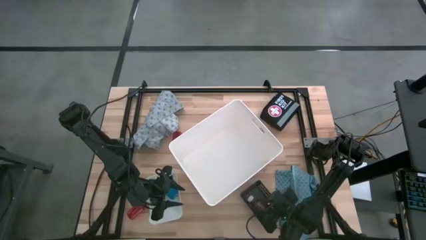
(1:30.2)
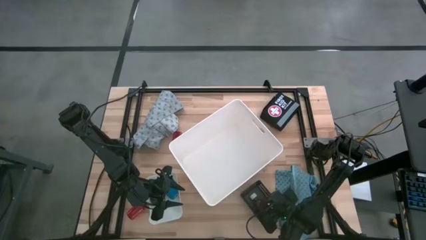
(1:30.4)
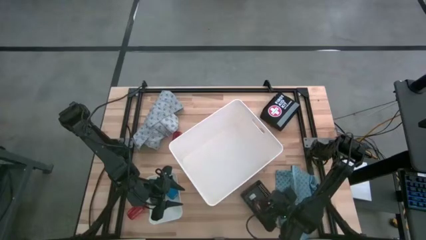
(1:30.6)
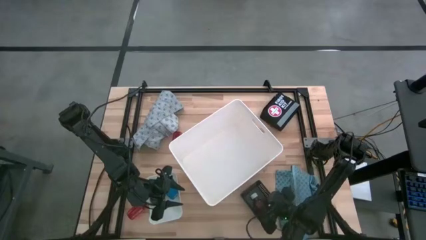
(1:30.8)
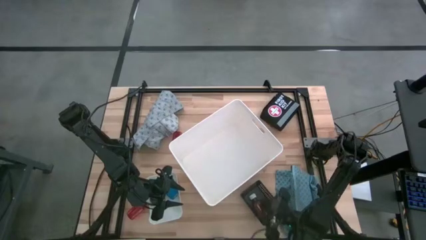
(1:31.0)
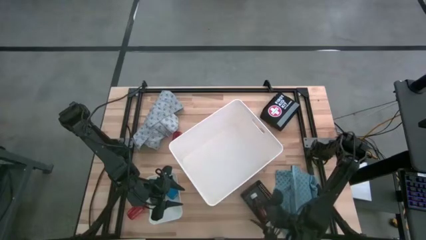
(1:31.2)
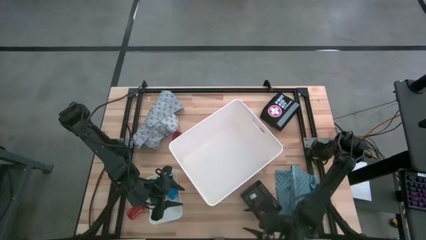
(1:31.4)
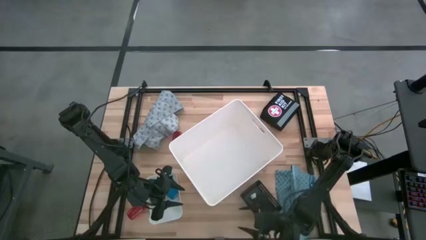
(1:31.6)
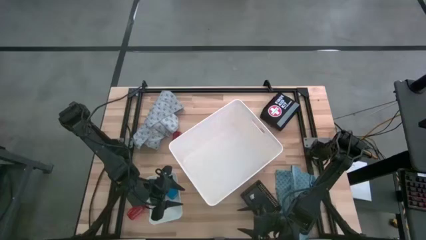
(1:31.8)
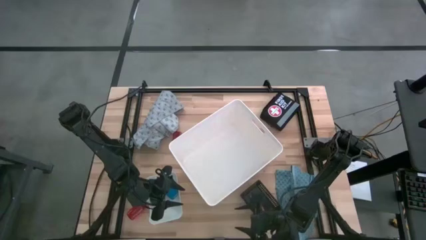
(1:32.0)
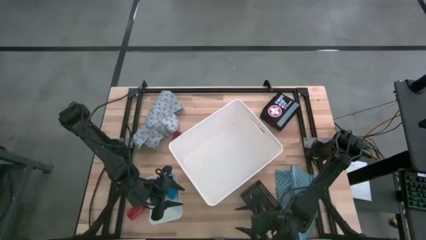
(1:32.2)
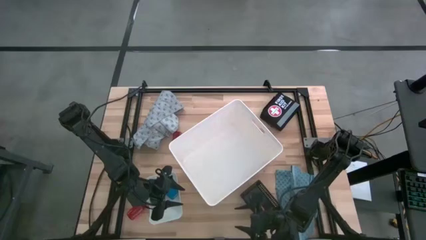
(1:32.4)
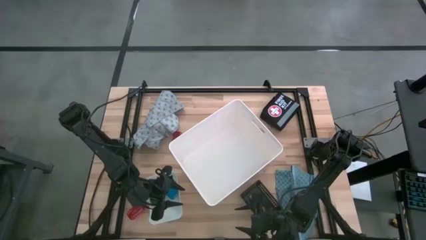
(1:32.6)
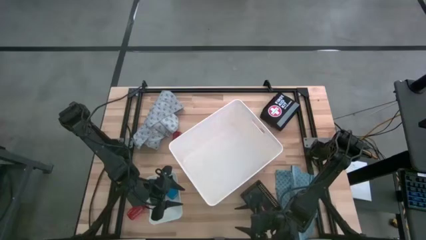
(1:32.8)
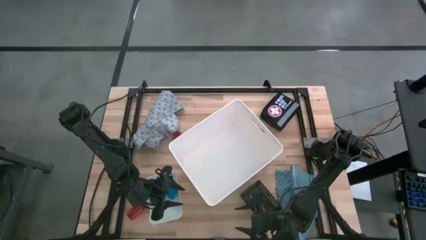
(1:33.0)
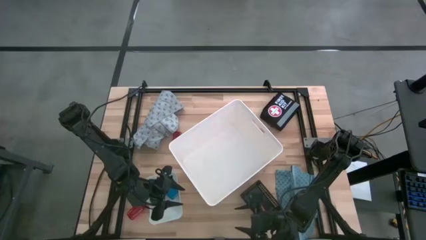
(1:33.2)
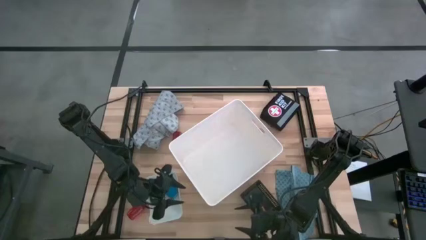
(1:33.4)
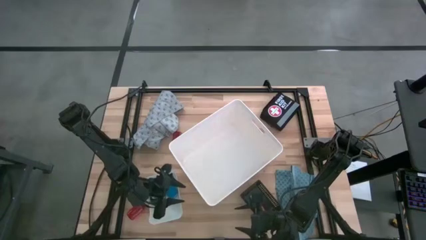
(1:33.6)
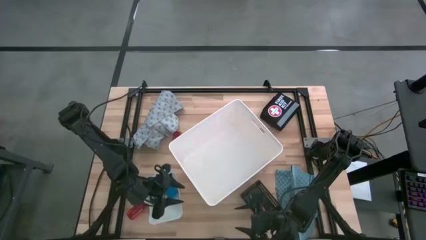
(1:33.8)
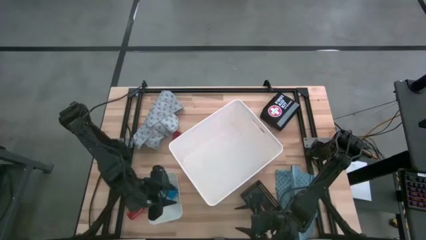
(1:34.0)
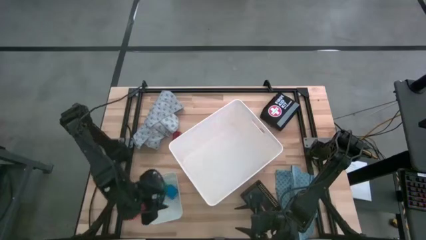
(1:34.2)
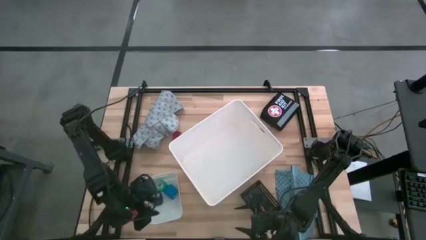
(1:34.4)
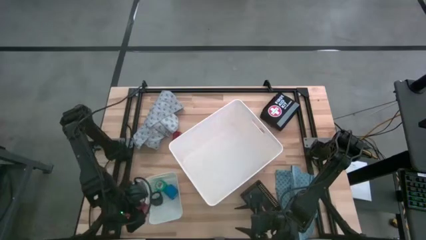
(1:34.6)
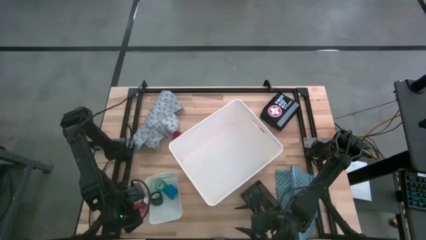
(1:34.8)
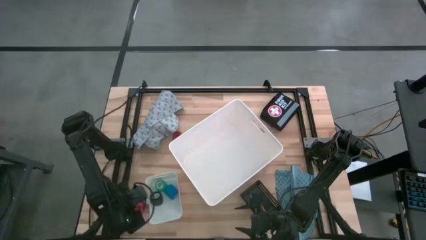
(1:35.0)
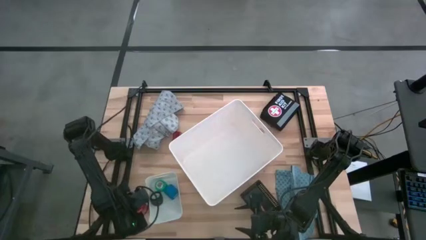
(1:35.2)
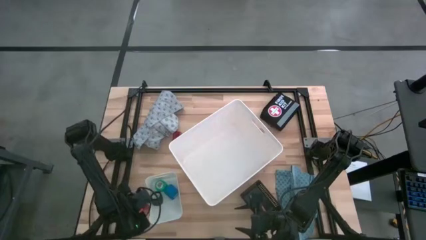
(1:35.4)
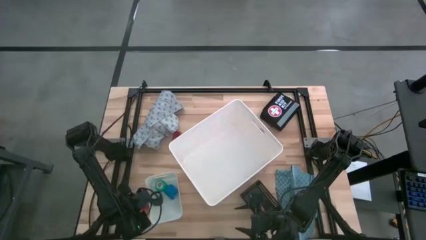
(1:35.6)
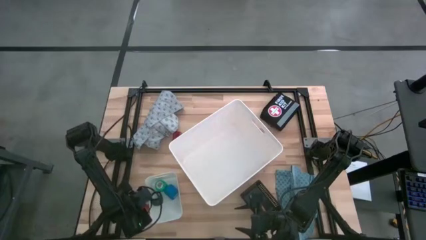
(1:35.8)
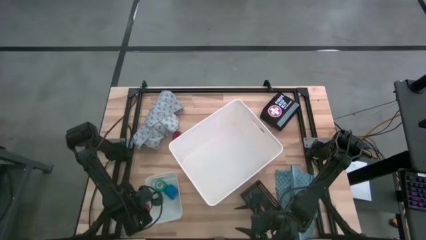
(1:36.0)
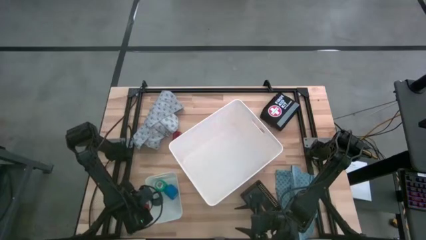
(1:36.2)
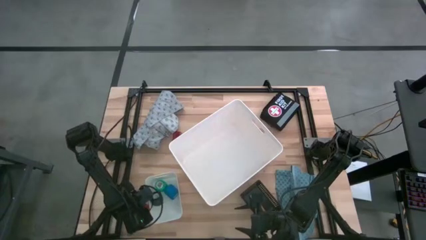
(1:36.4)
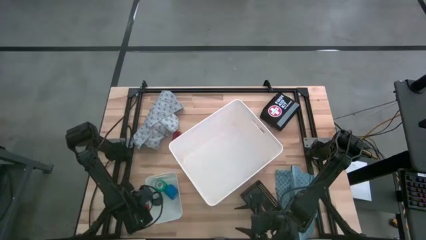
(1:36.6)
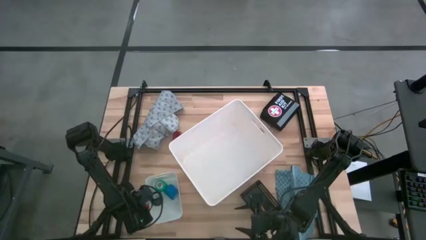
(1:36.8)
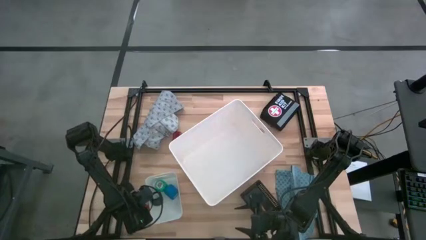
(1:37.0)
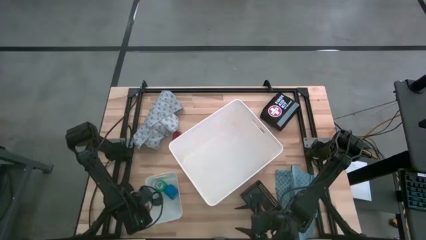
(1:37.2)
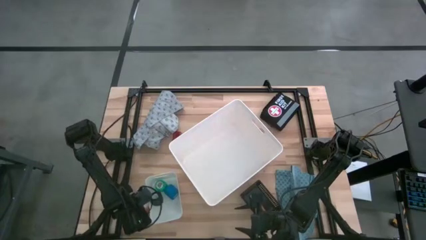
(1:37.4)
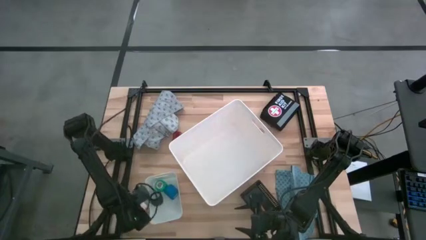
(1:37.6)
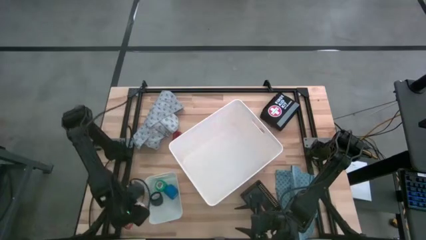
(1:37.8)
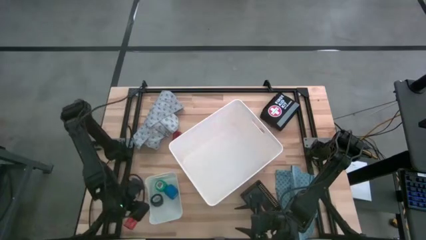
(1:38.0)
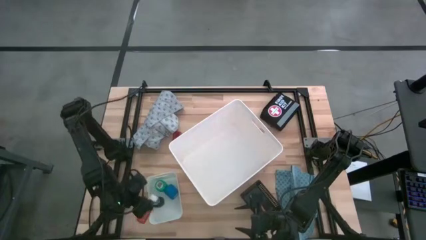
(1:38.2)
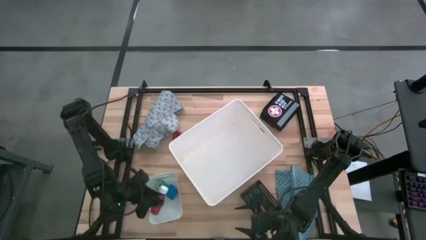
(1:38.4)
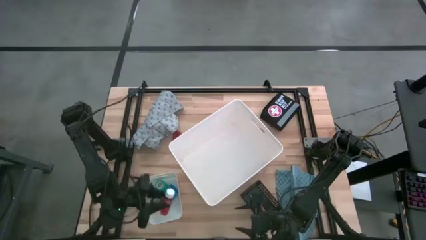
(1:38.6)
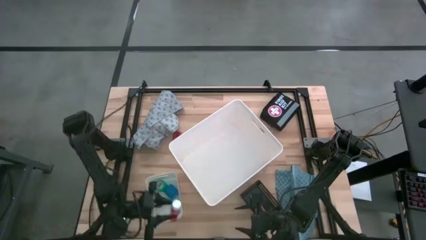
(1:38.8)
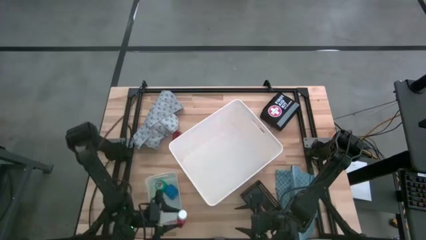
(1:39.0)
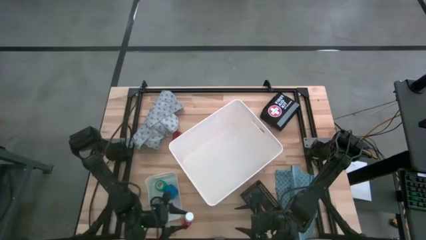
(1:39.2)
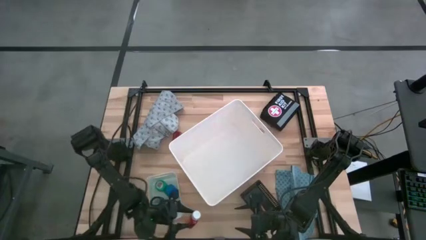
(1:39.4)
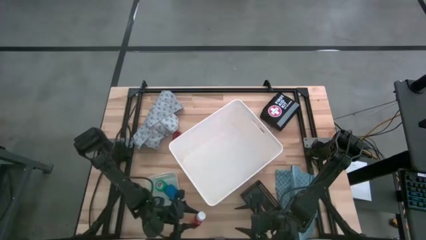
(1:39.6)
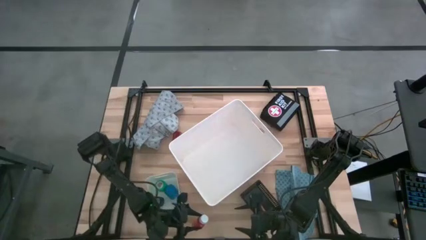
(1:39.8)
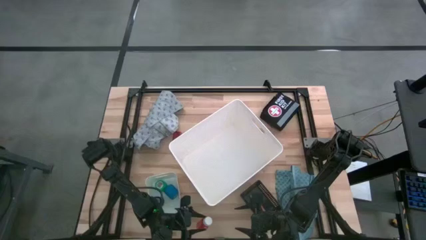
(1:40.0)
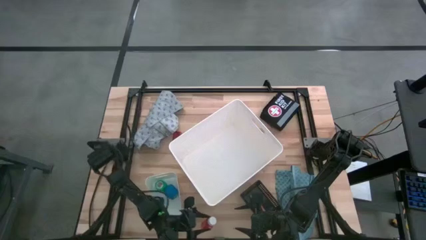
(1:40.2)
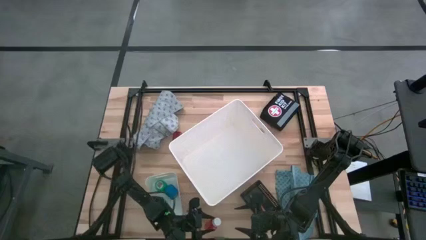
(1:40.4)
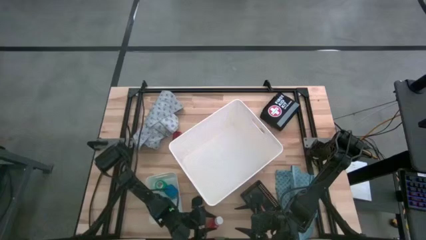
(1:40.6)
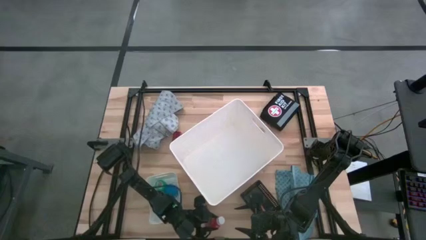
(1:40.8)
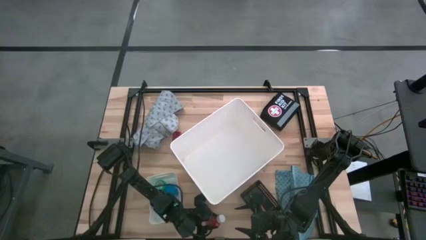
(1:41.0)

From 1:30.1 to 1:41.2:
Task: Pick & place medical supplies in basket/bin
Put the bottom orange bottle into the black basket

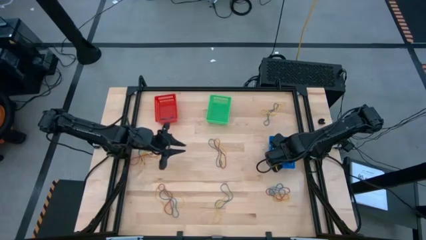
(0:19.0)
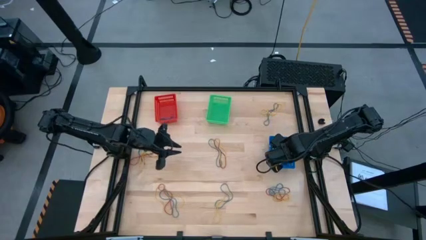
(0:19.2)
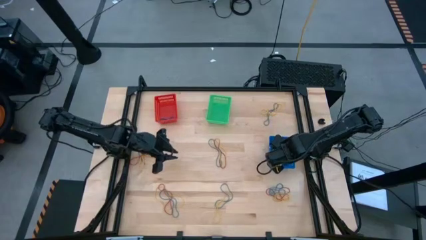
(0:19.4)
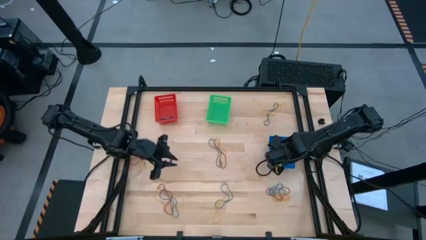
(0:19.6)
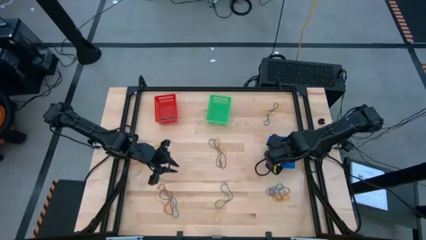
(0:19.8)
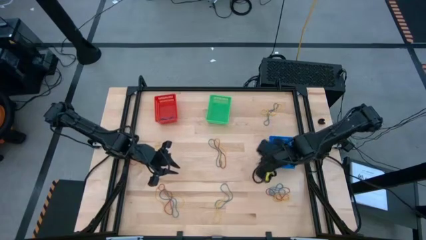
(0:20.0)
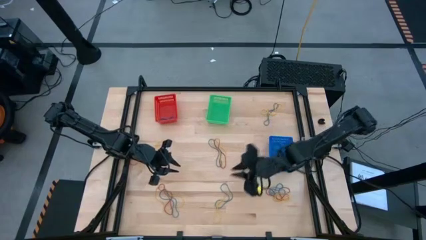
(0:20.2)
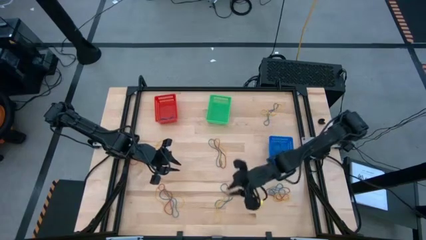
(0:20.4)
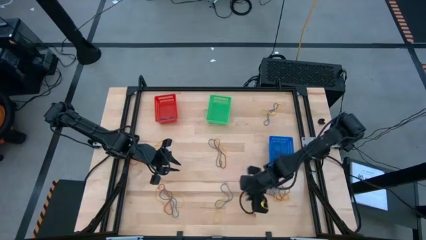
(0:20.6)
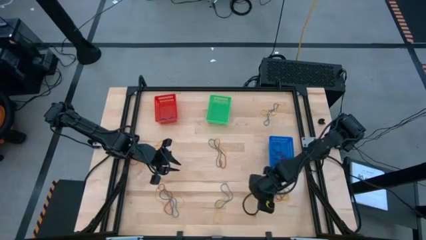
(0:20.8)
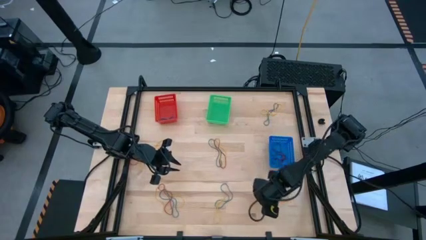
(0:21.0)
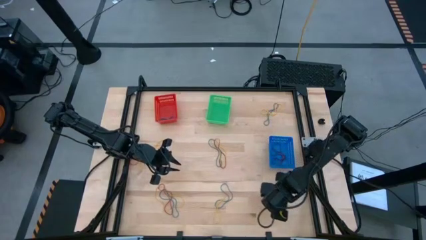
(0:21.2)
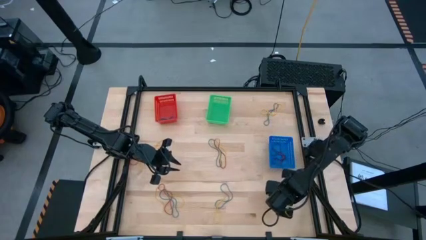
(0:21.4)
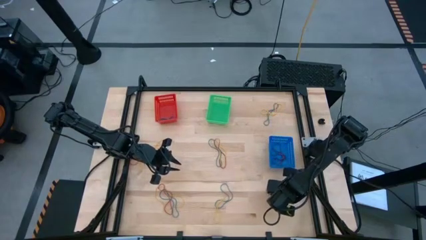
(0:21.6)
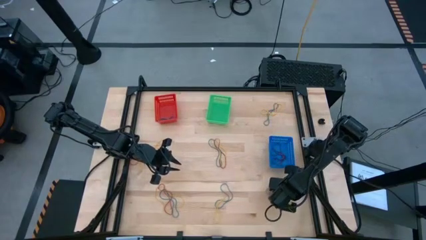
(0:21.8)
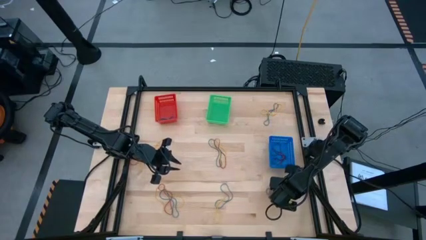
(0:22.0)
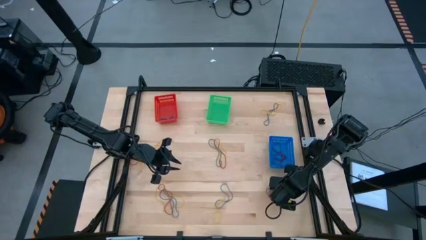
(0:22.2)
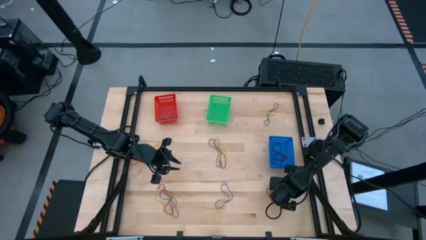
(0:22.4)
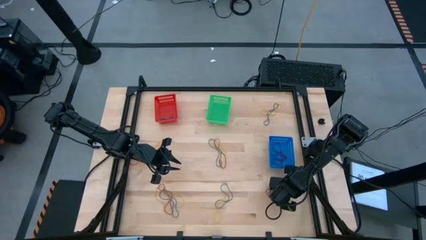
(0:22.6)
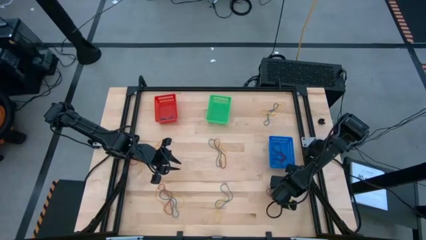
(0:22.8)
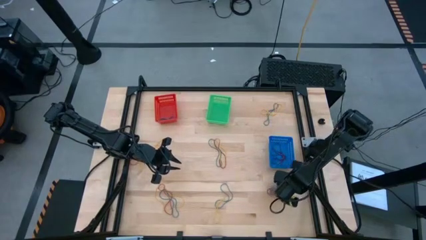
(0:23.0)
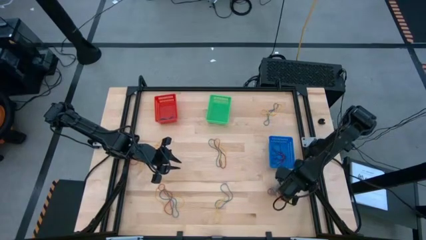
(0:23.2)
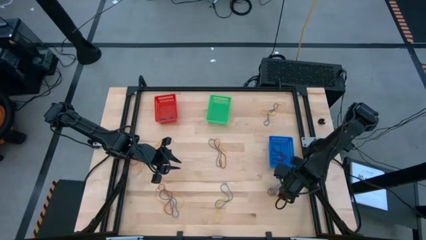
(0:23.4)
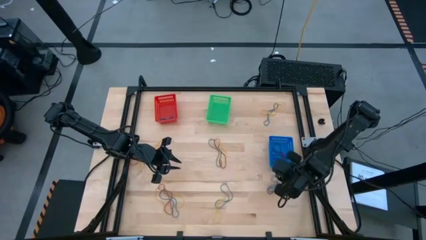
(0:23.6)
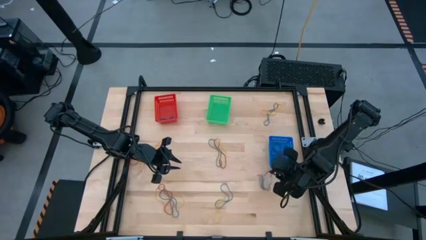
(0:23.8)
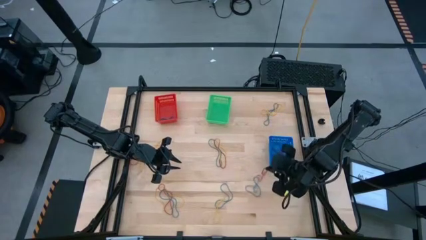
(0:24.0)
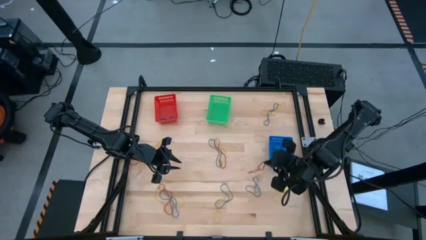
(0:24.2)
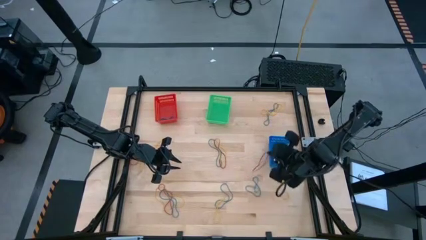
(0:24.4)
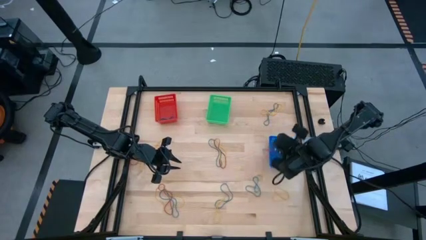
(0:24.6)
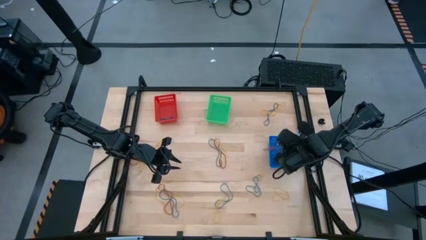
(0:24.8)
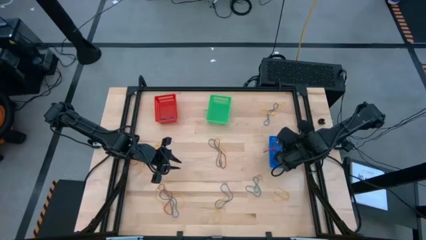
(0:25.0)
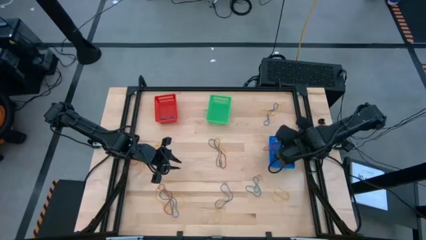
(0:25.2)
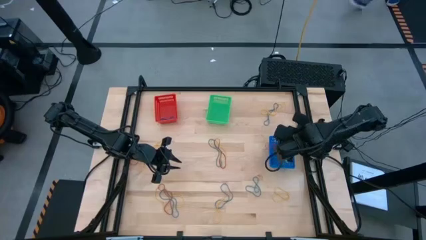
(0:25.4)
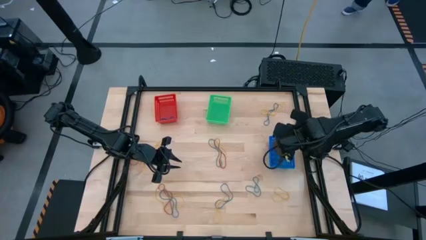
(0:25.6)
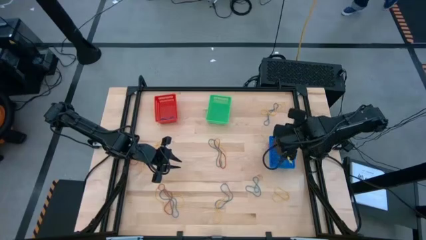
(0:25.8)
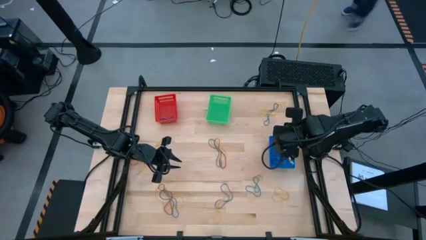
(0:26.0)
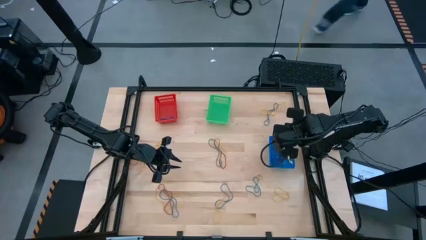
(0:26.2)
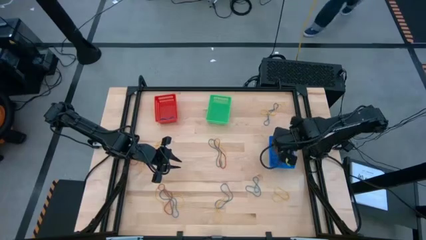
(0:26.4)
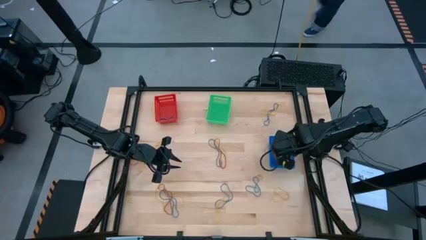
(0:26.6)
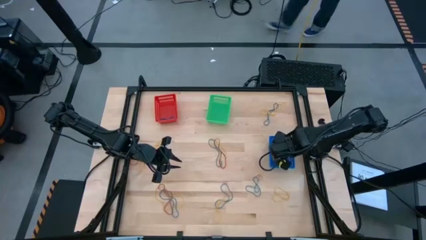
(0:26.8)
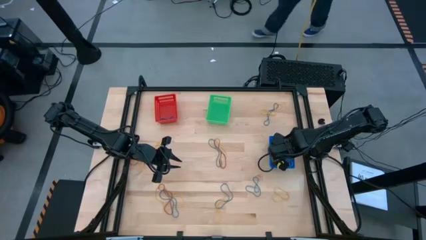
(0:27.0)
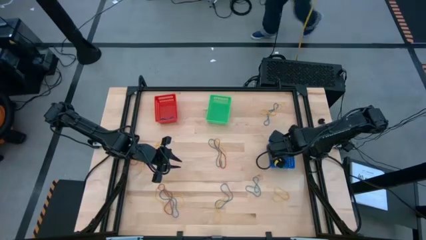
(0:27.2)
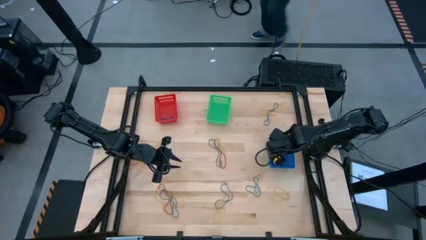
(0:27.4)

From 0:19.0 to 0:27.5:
Task: Sort rubber bands into baskets
Put the red rubber band into the blue bin
